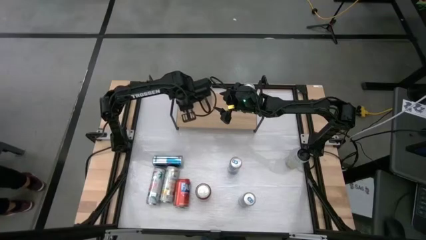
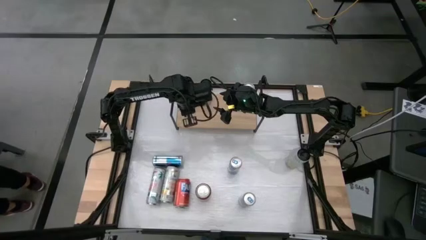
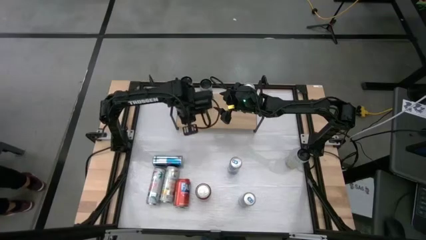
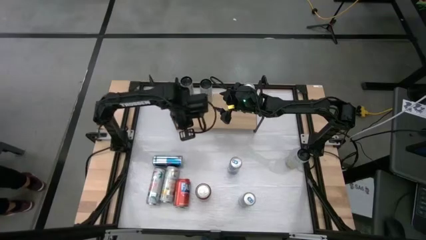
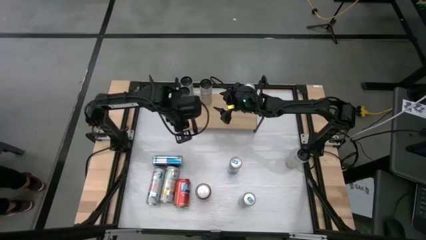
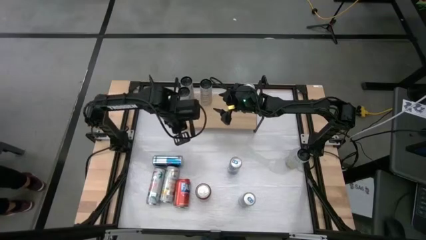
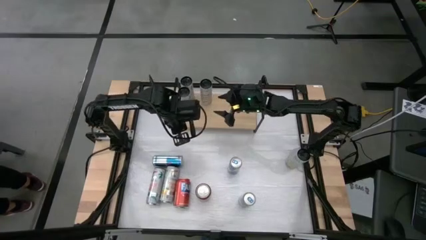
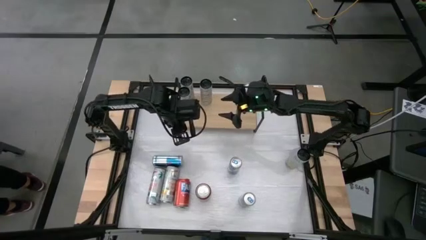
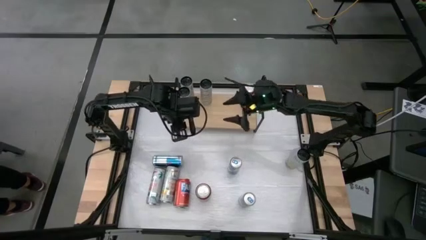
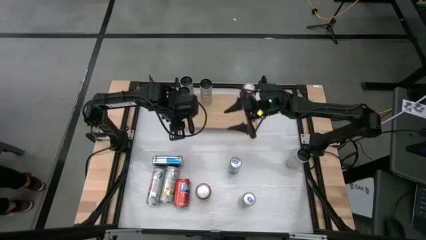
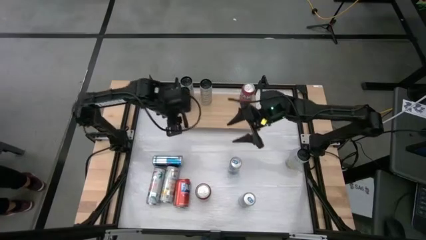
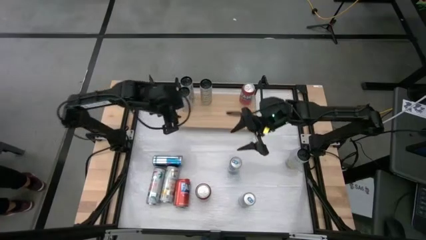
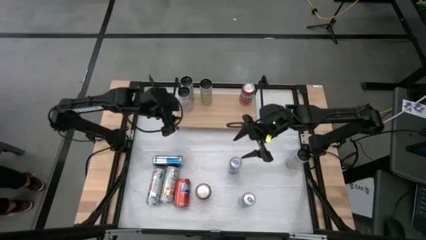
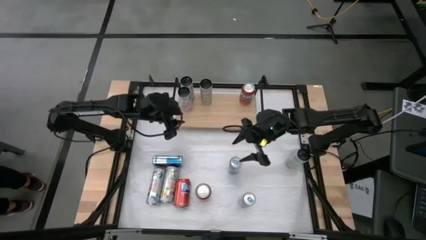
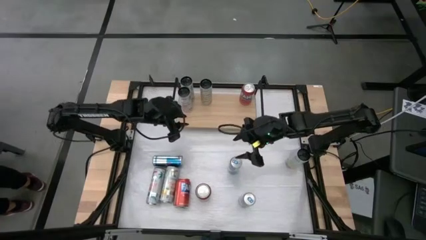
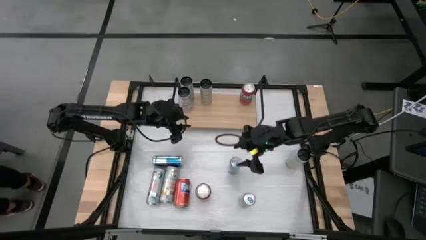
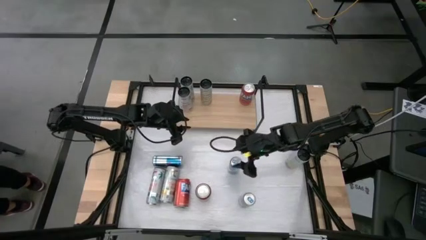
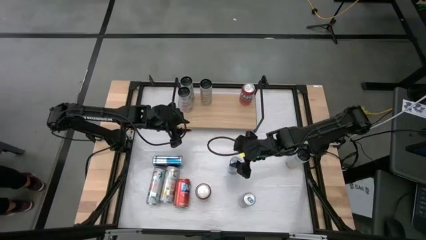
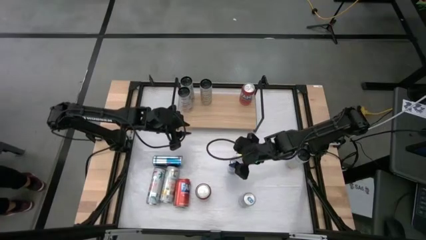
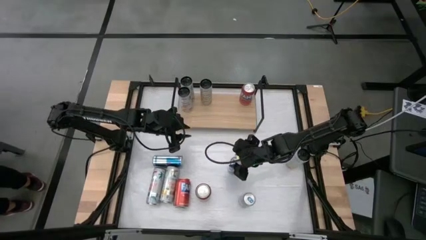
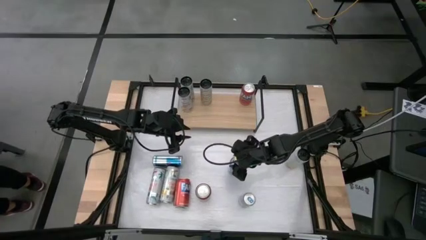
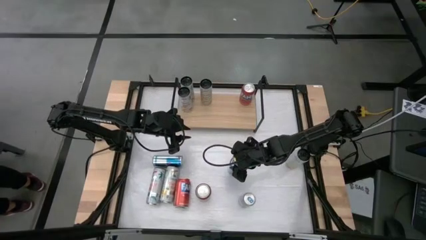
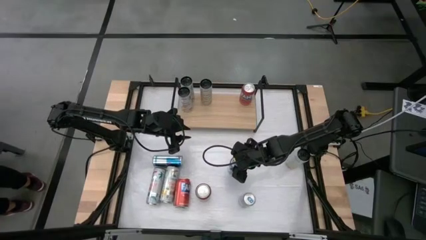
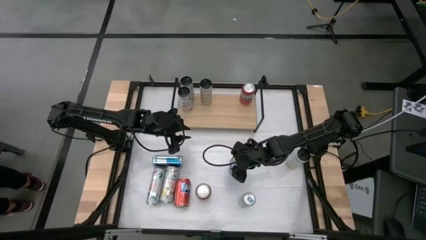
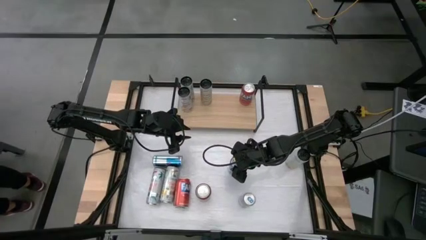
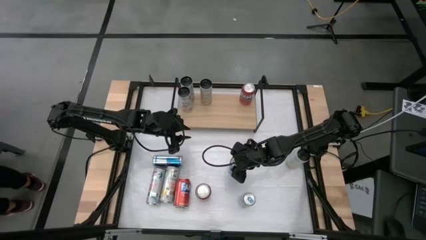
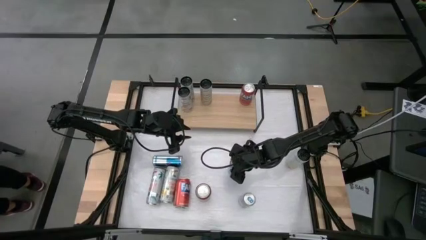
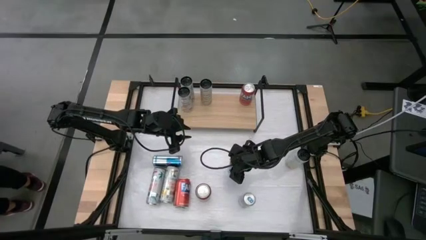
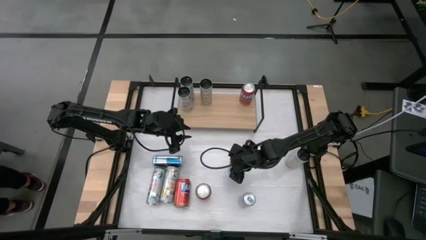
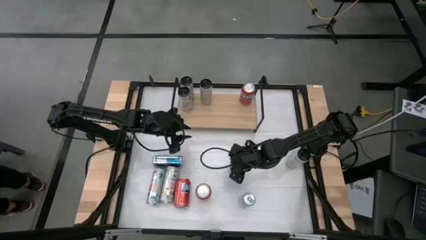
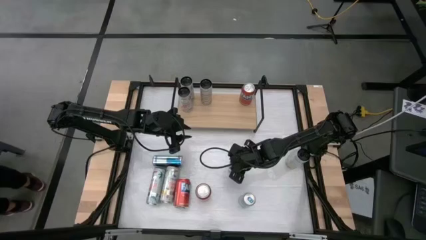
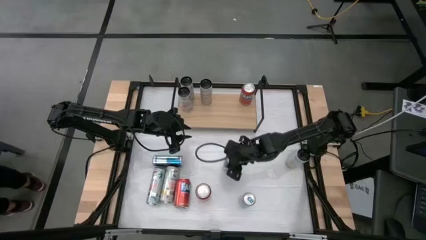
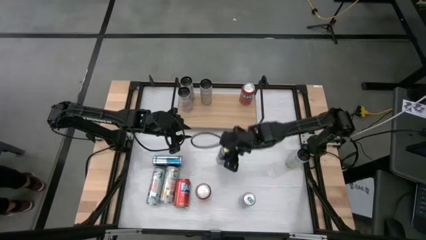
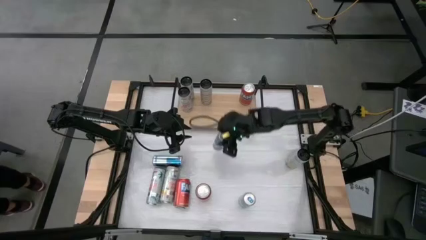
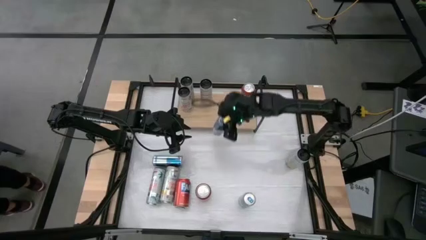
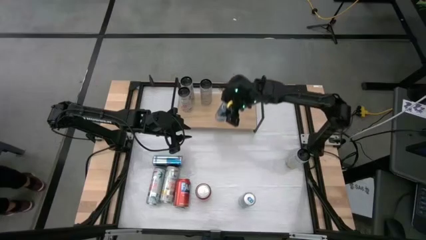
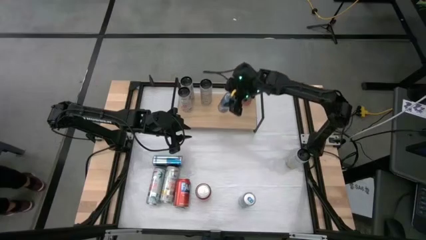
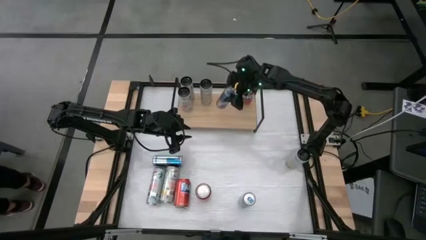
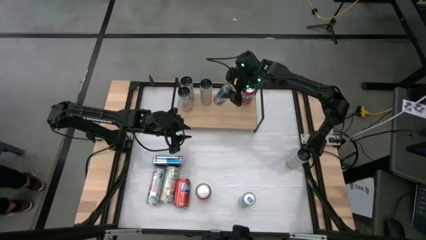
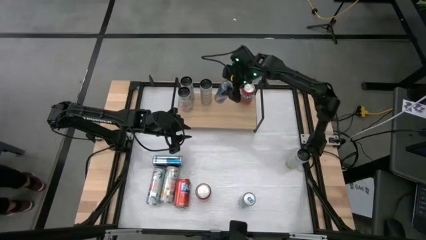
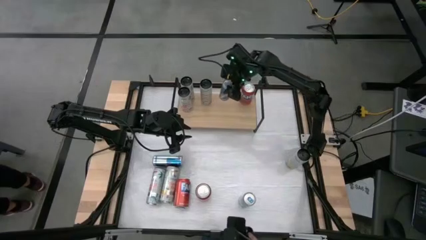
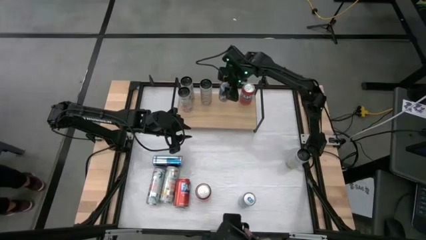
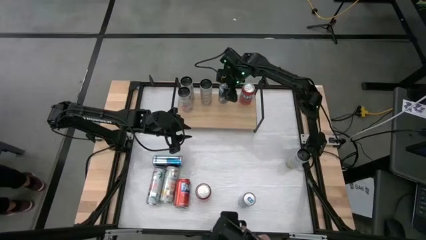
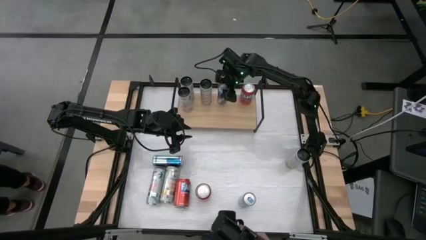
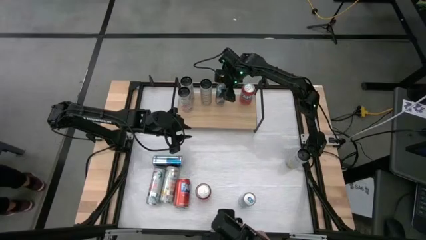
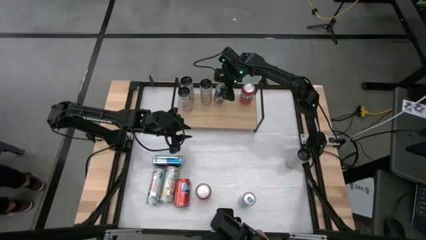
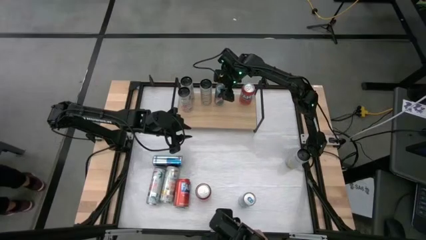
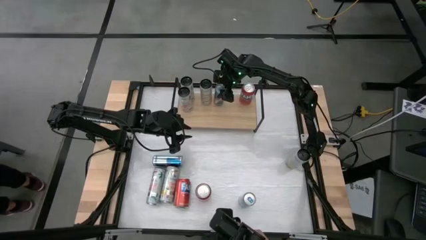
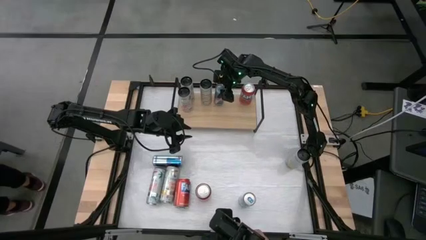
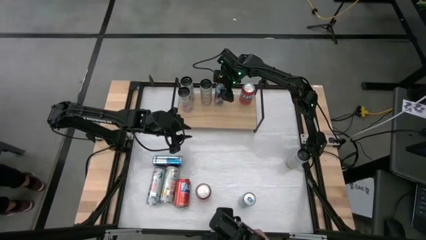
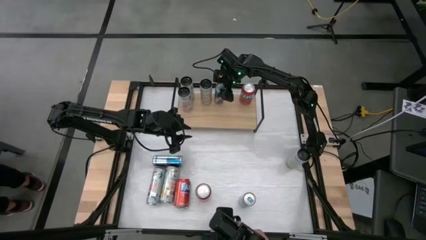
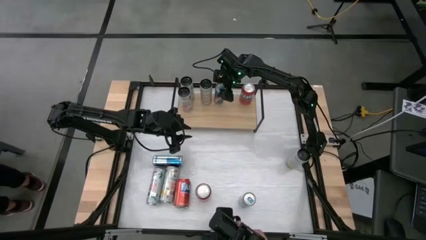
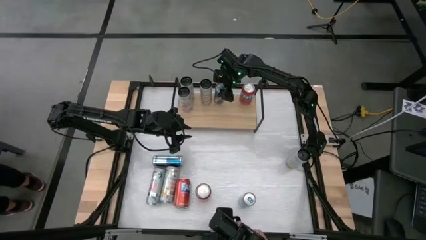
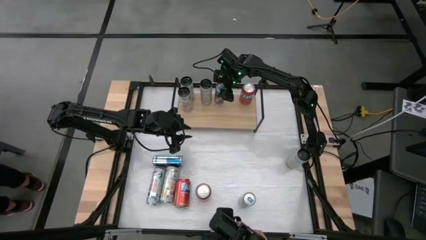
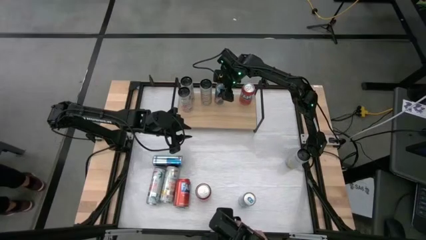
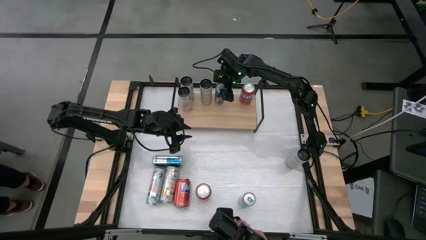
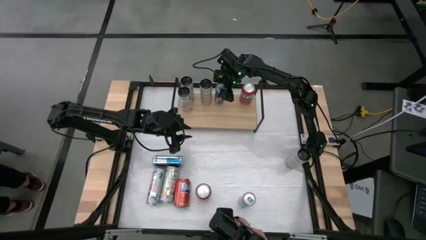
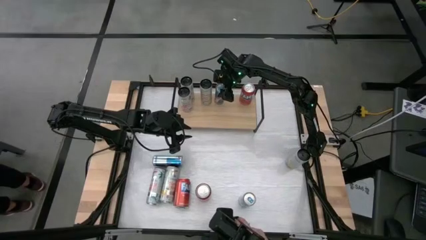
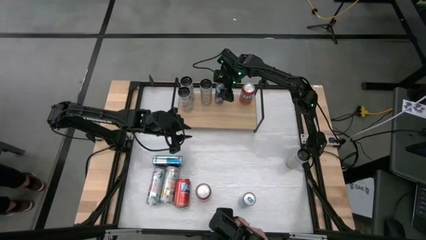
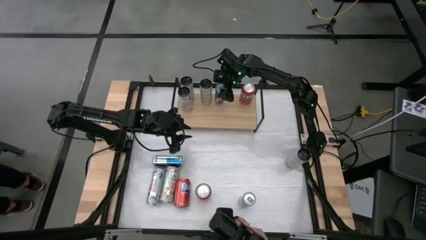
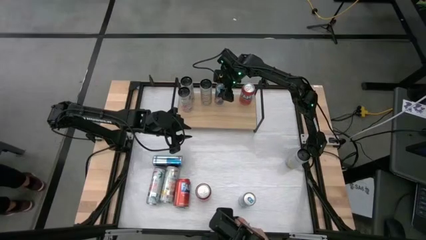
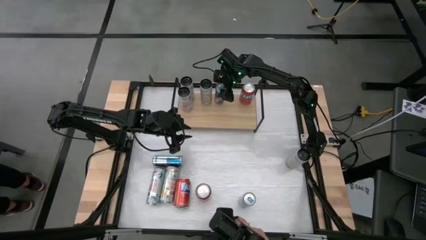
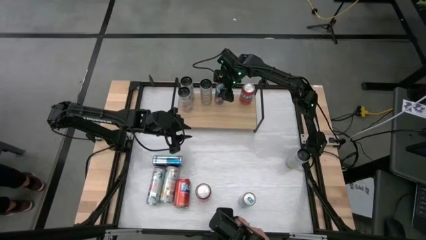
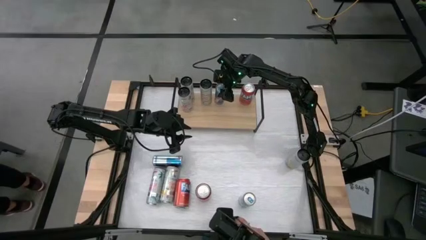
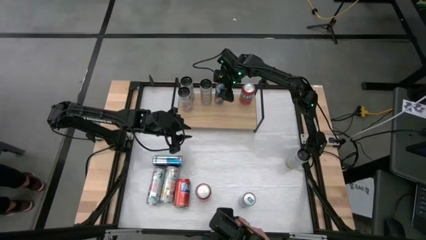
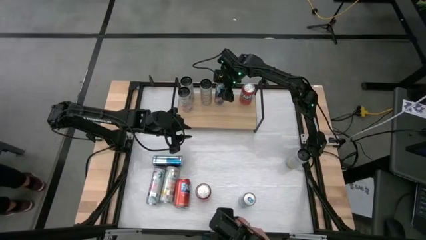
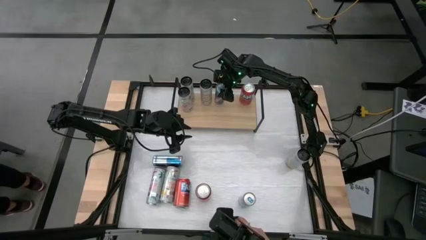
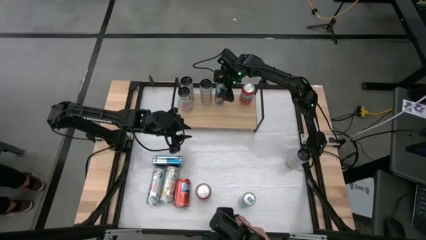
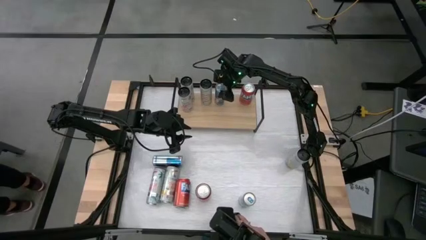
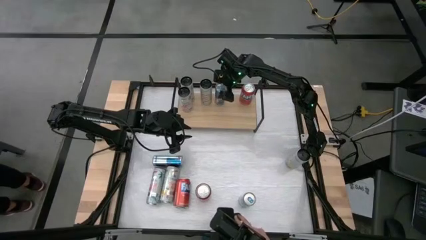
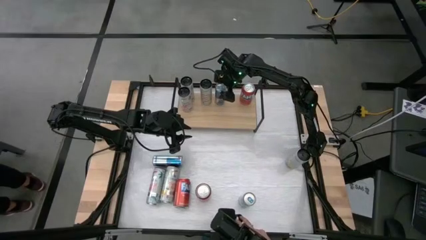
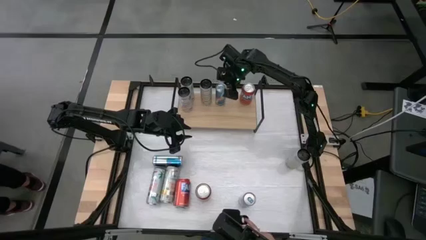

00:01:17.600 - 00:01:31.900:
Task: Place canned beverage on shelf
Put the top right blue soda can on the shelf

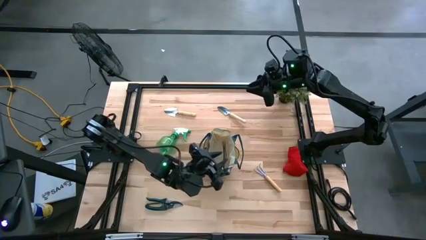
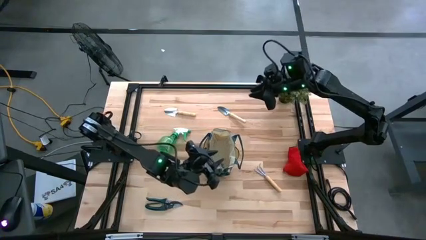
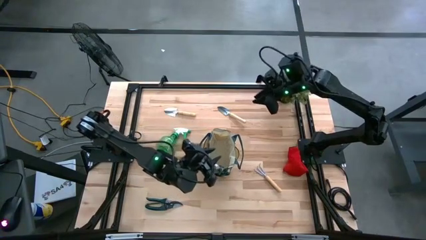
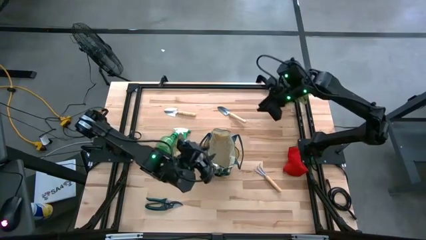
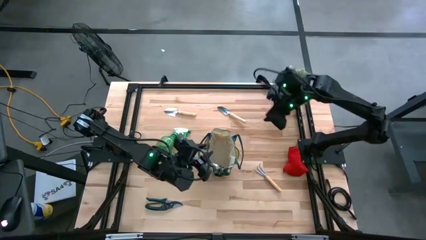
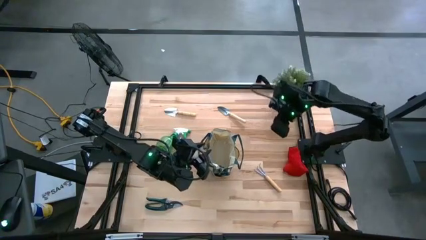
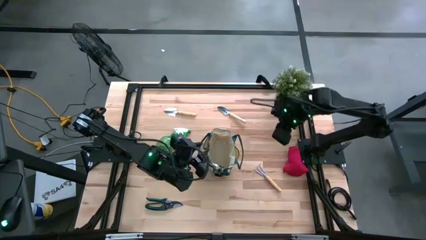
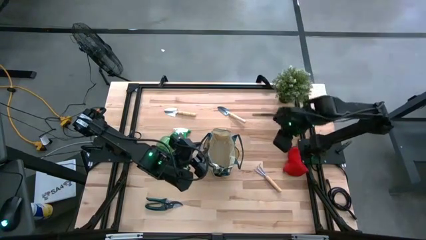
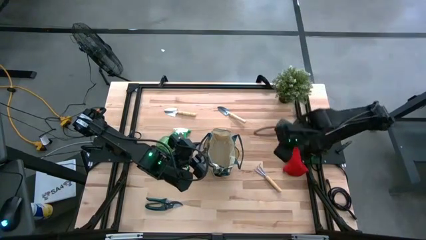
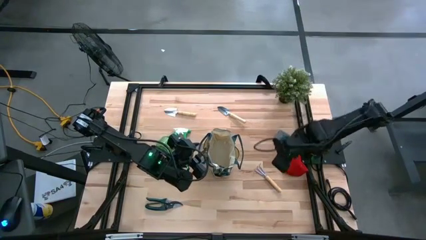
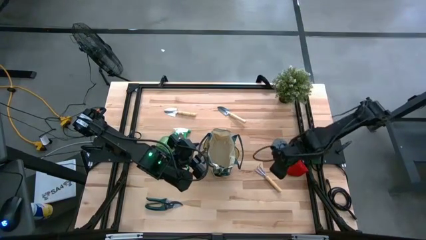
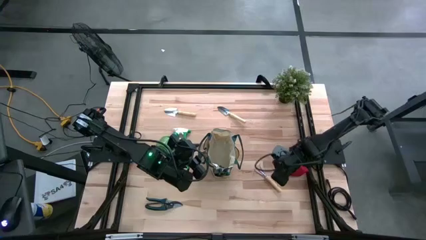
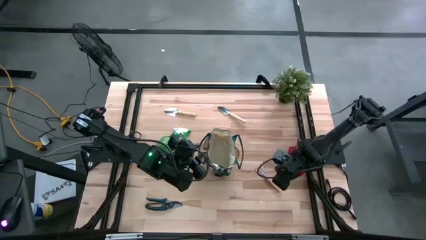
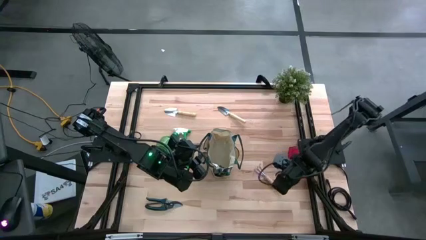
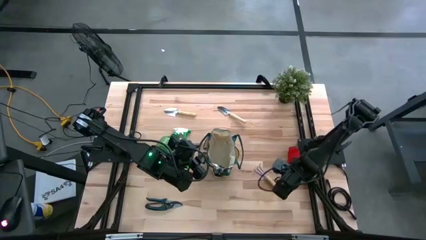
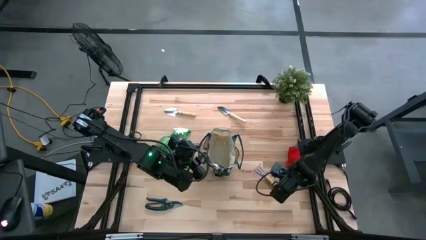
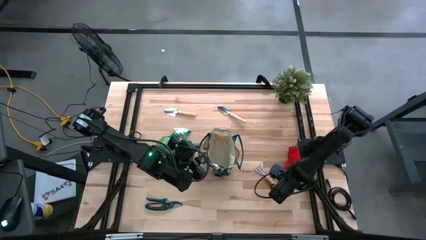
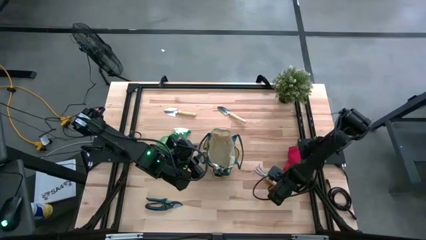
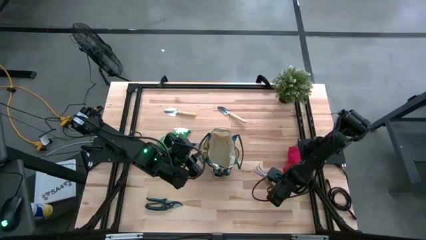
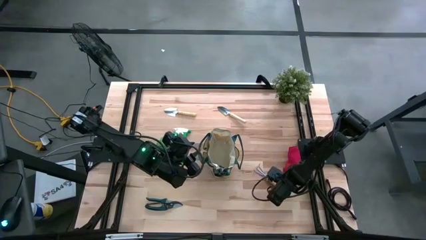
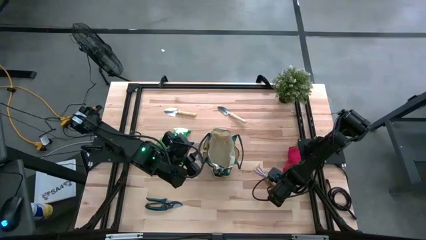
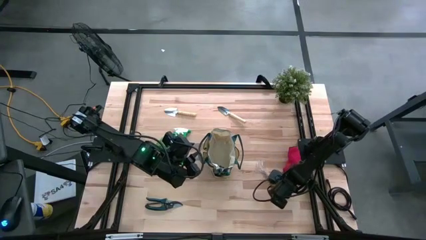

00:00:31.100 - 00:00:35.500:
Task: Pick & Place Garden tools in Gardening bag
Put the brown hand rake into the white gardening bag
